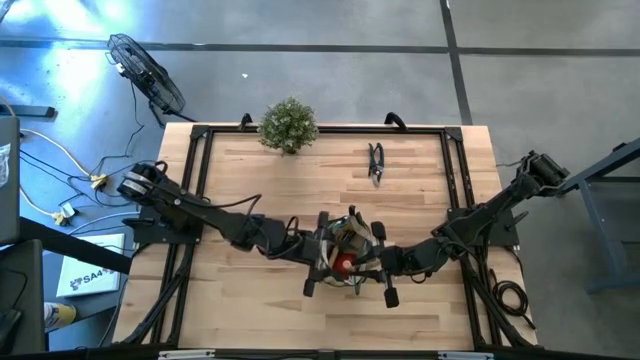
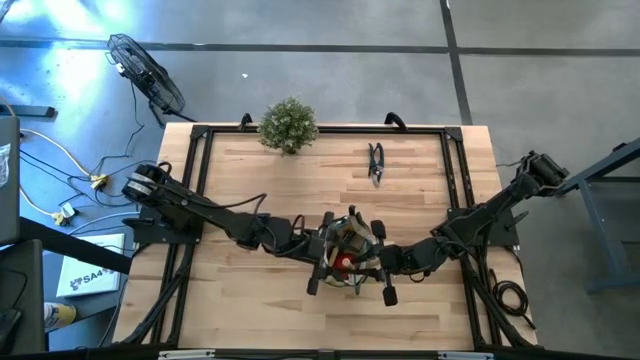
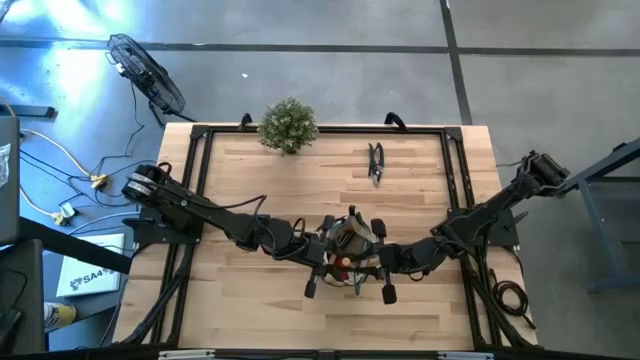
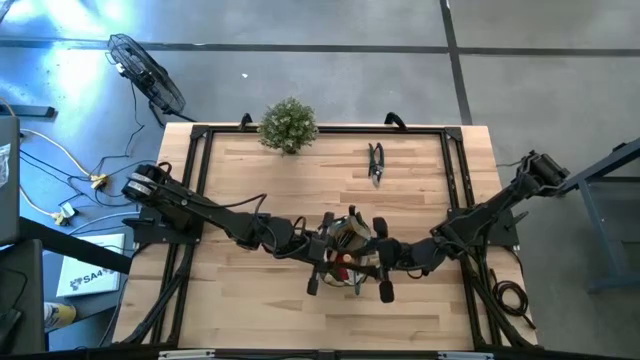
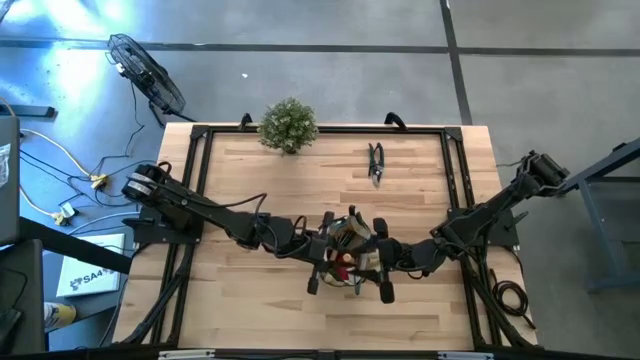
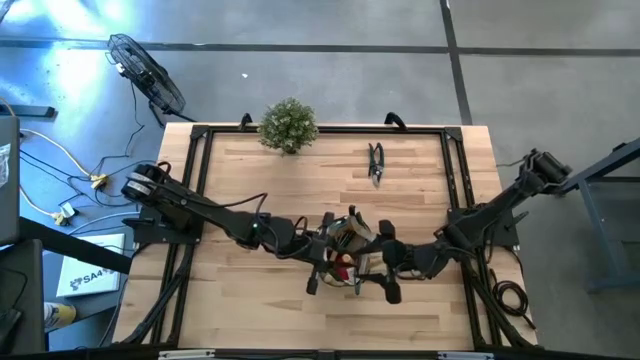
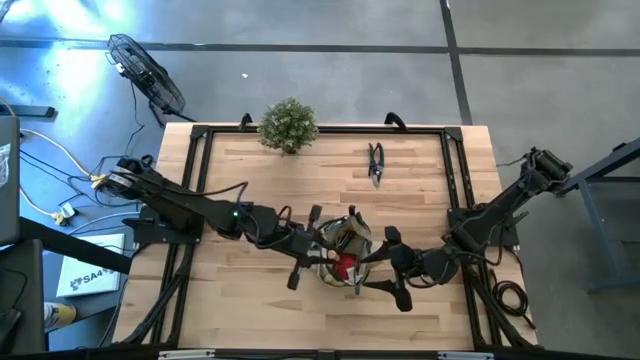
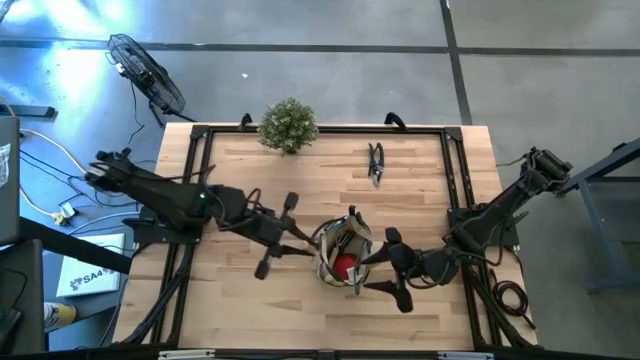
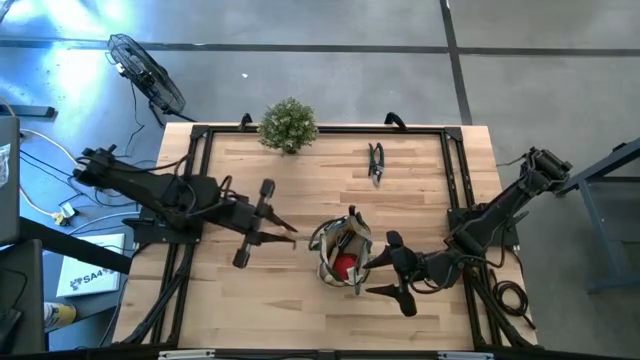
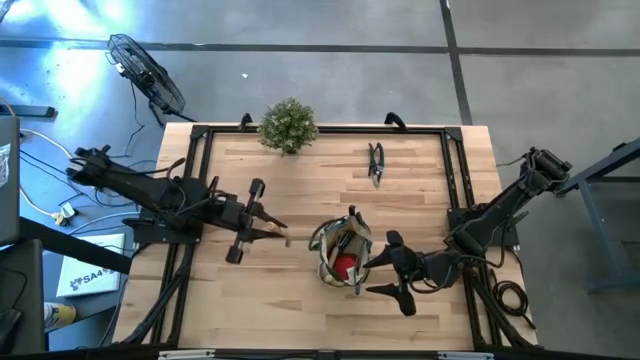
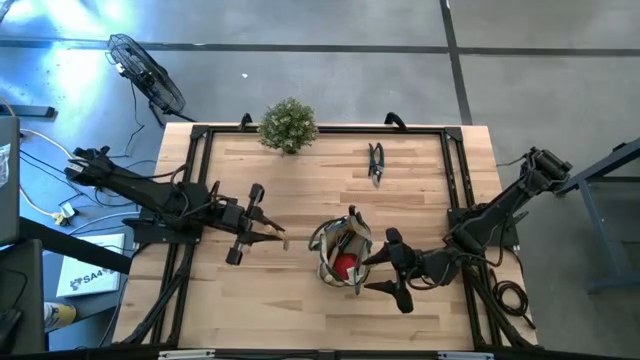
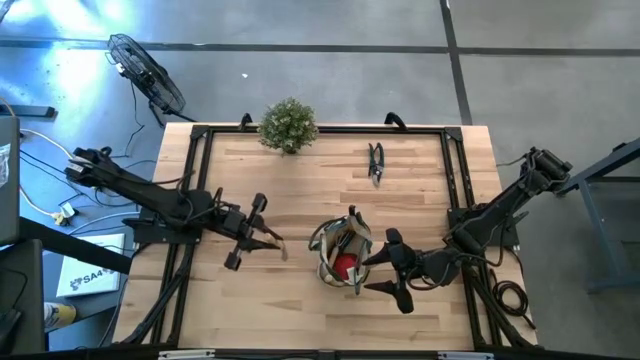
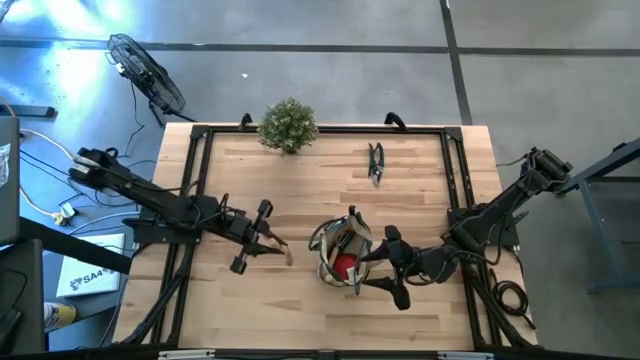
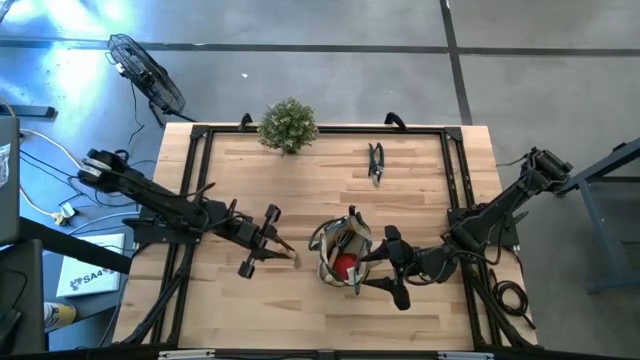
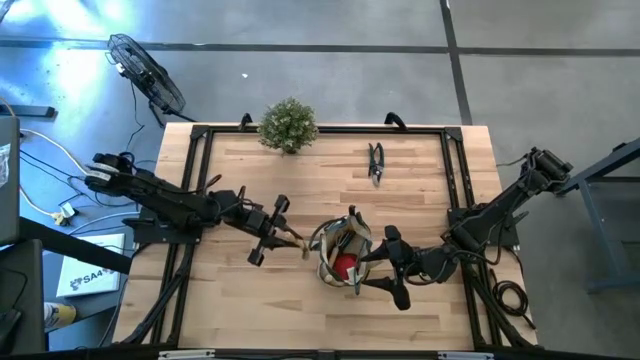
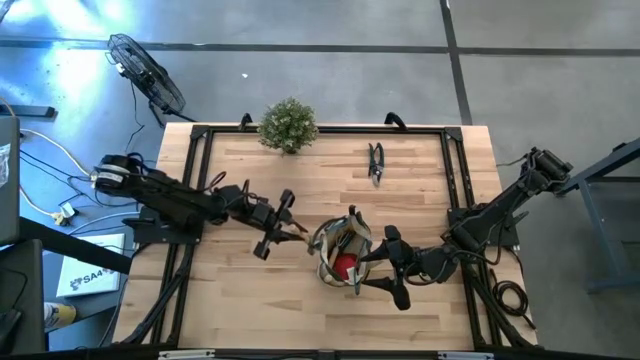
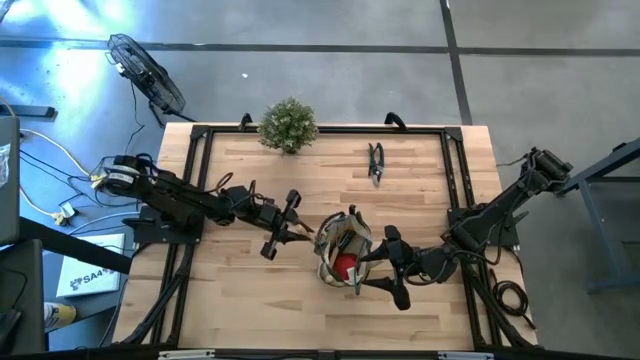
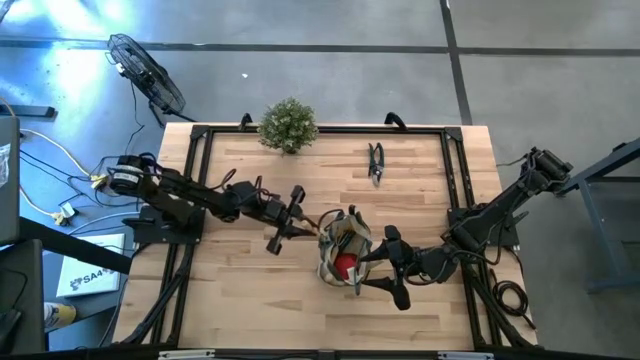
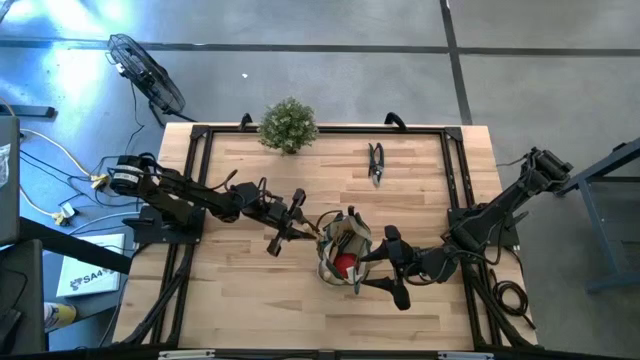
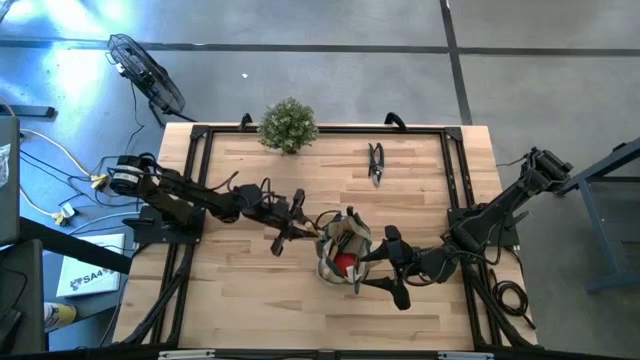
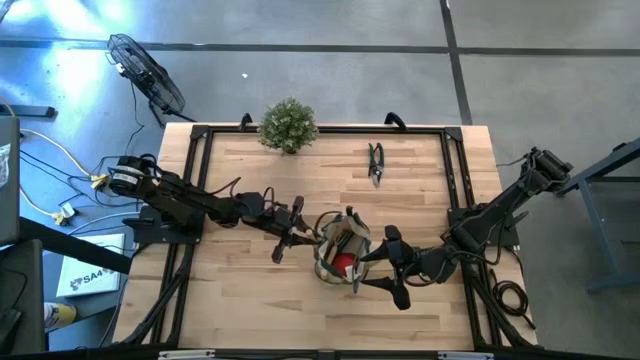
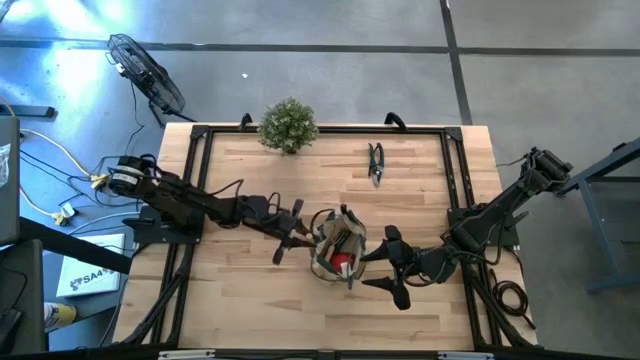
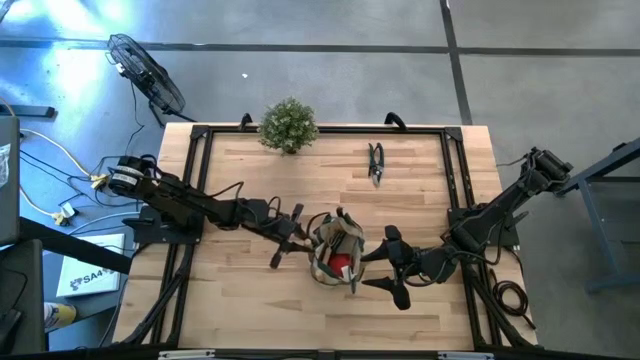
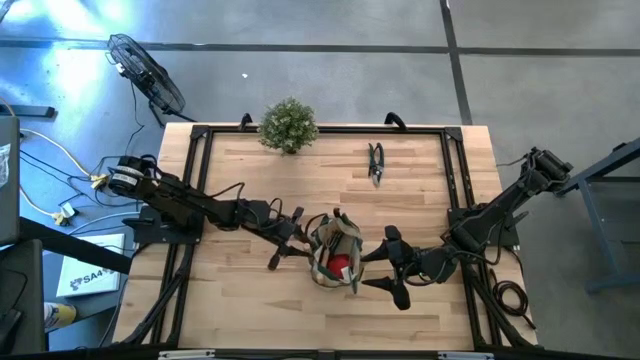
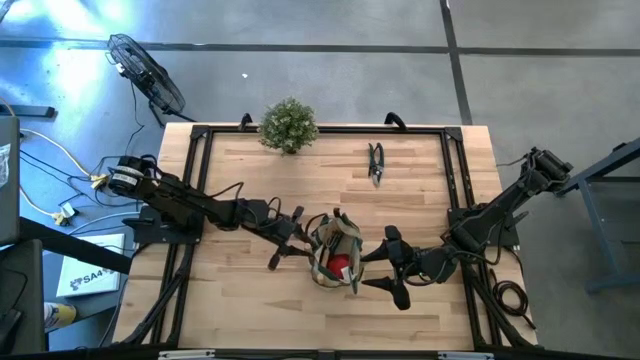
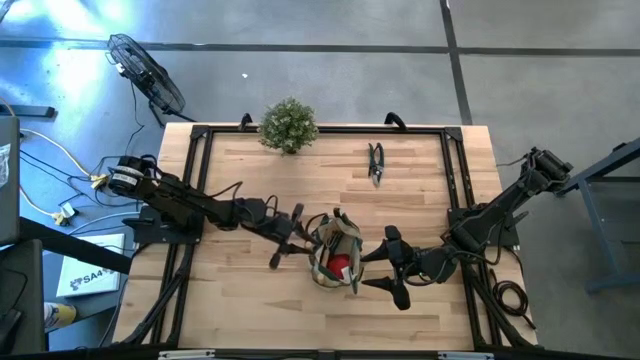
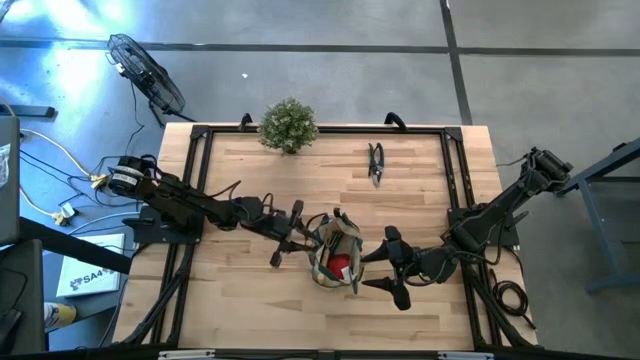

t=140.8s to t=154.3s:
Task: Pick & Place Garden tools in Gardening bag
Put the brown trowel into the green bag

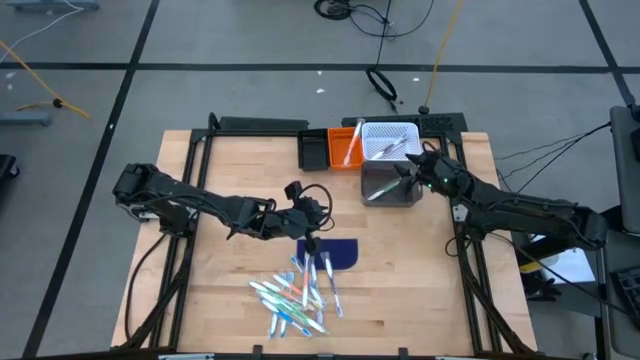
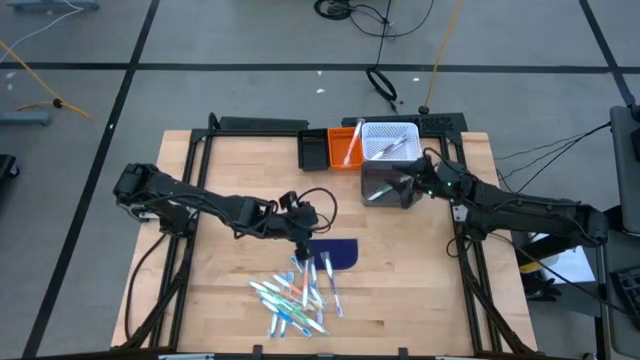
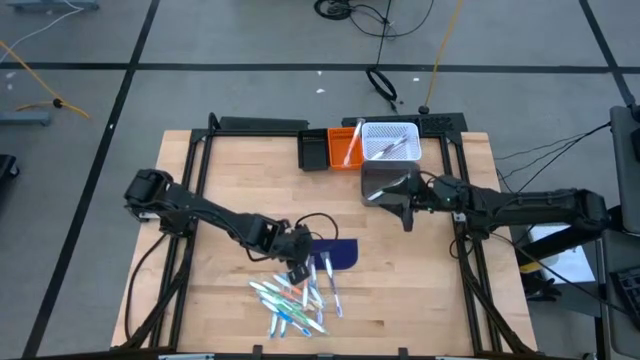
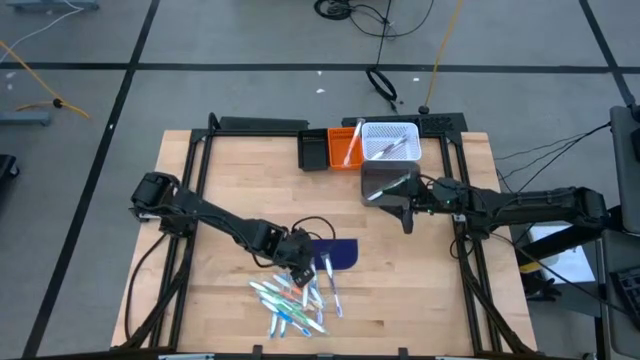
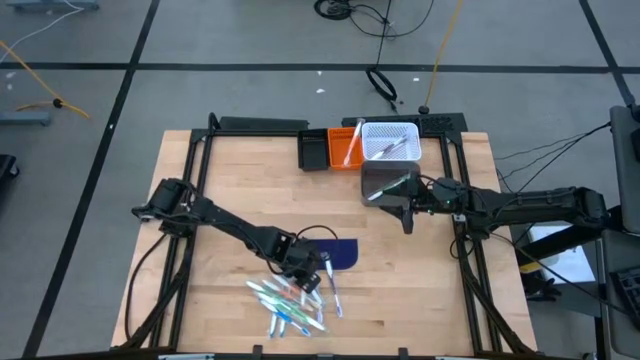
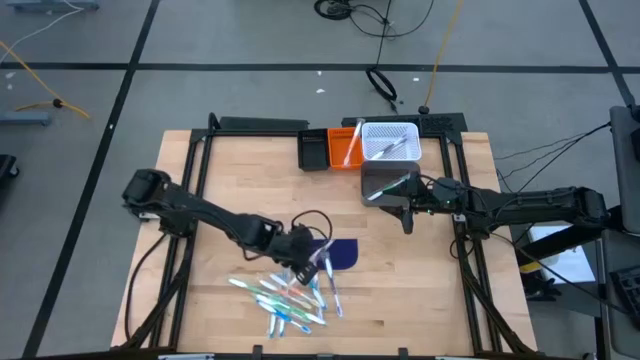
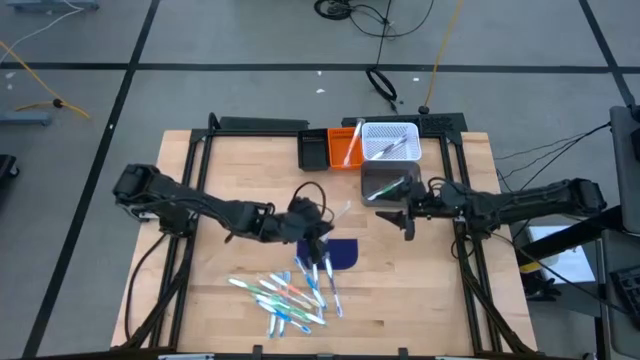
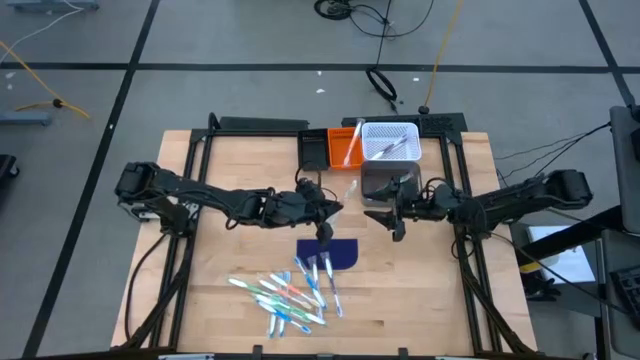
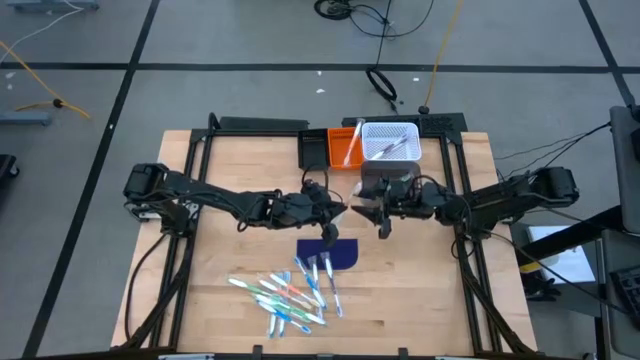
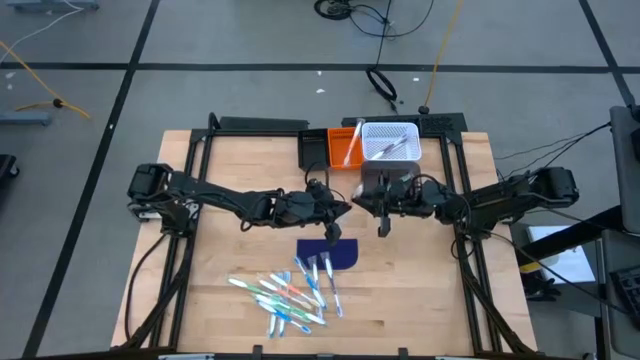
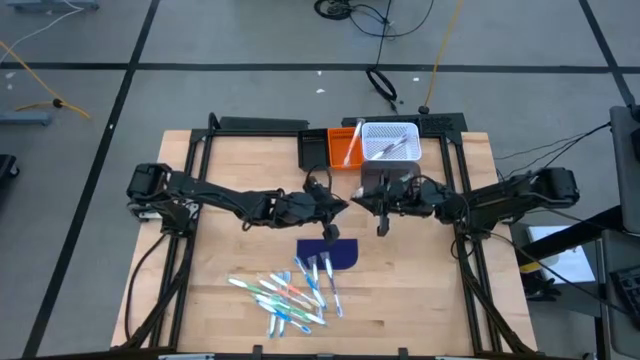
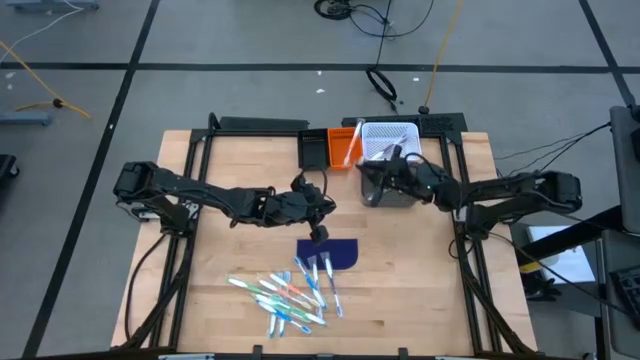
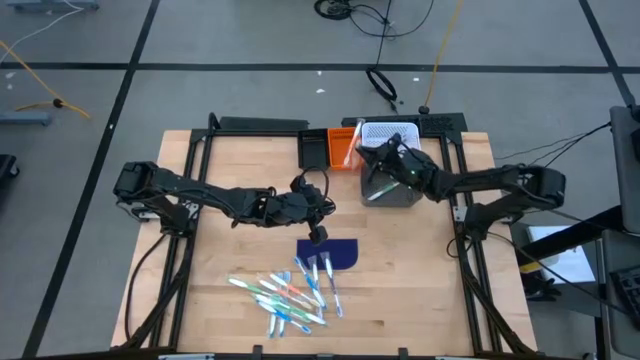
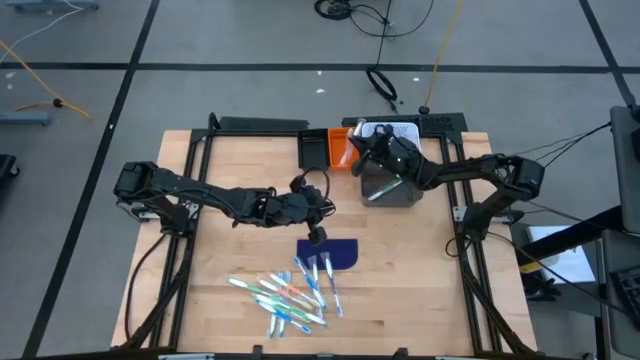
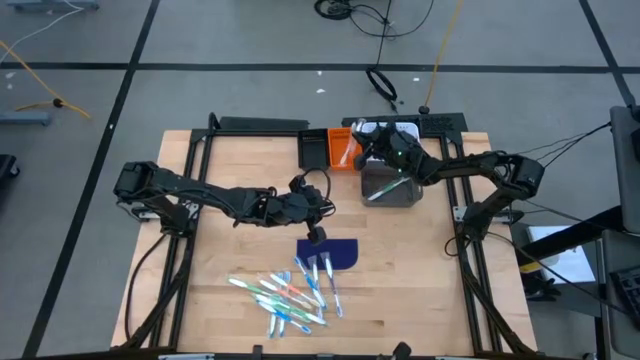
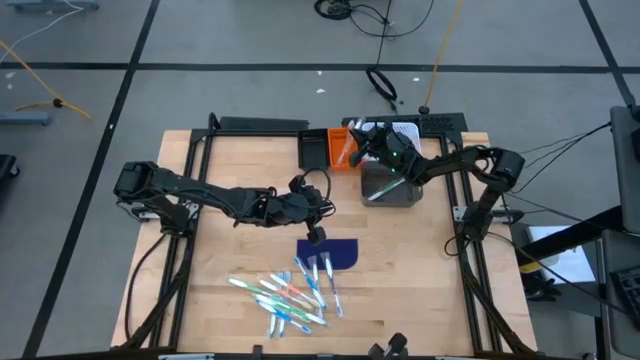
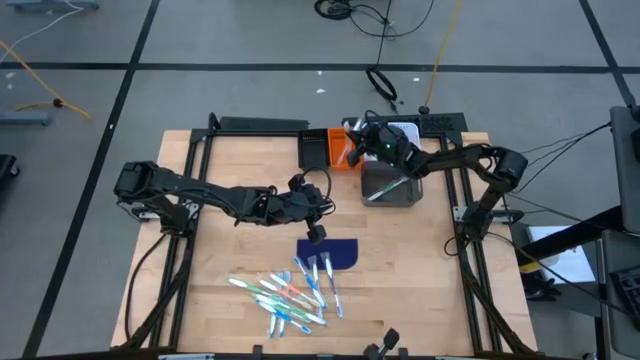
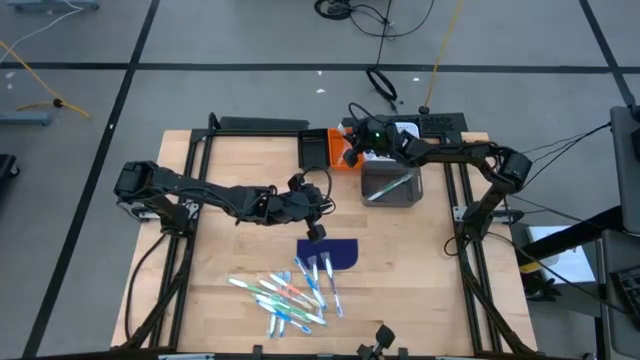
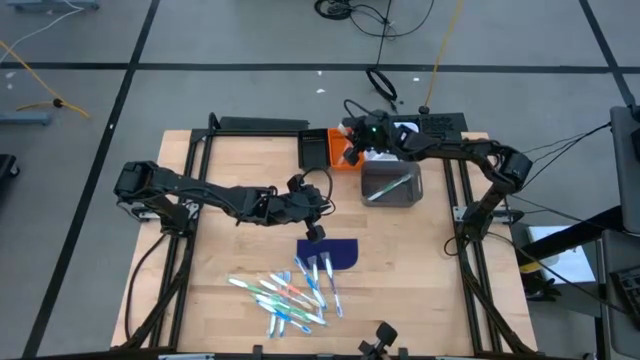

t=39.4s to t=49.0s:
Task: Pick & Place Toothbrushes
Put the orange toothbrush into the orange bin
